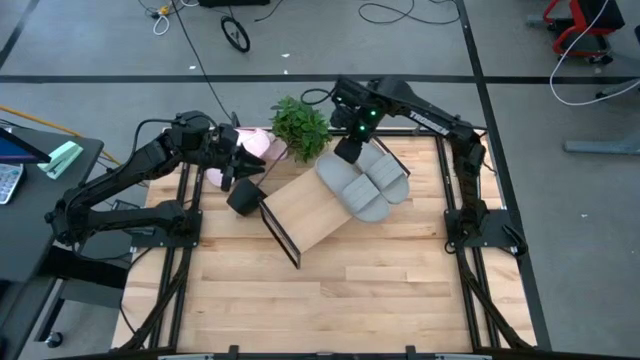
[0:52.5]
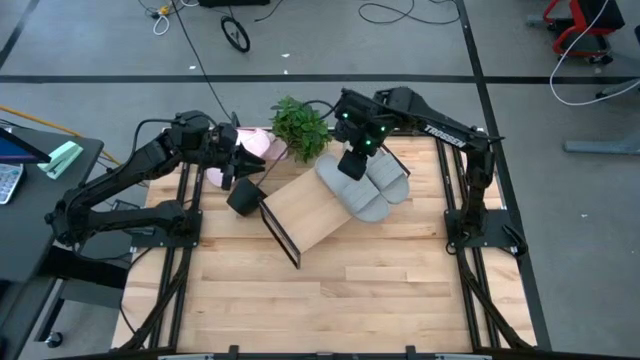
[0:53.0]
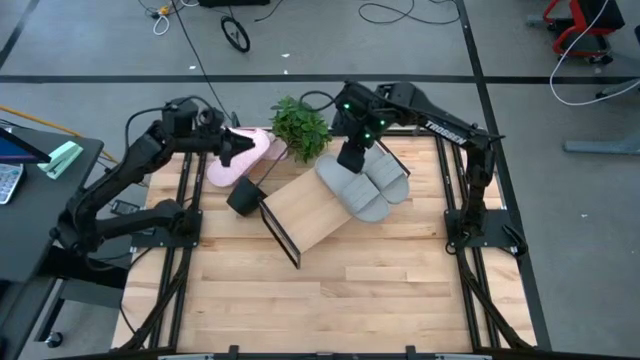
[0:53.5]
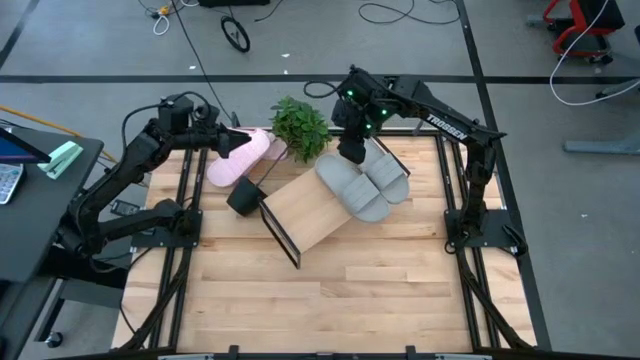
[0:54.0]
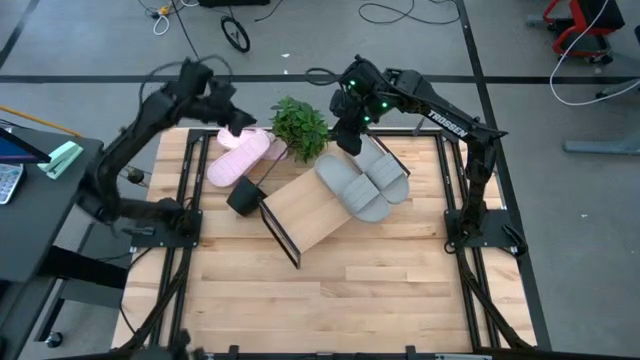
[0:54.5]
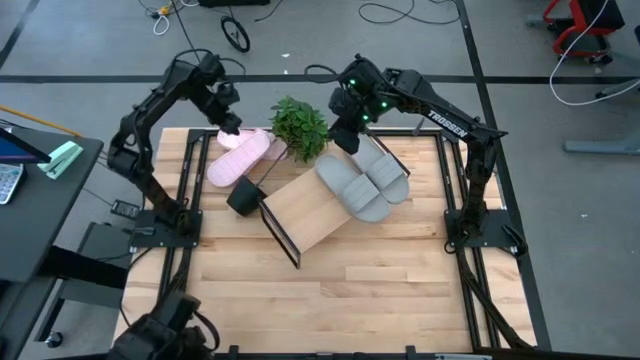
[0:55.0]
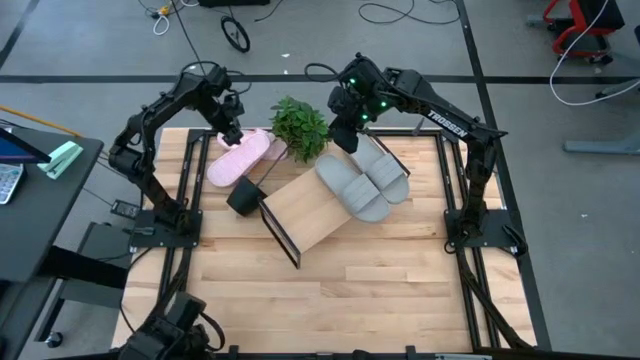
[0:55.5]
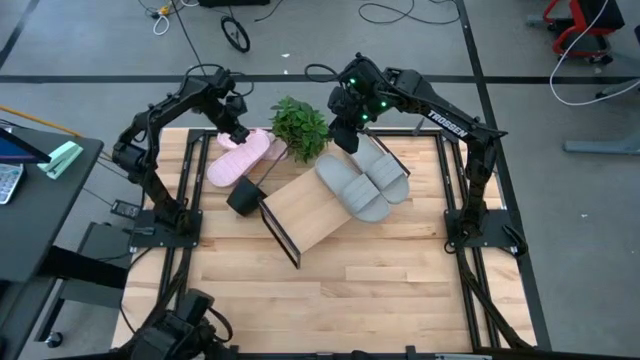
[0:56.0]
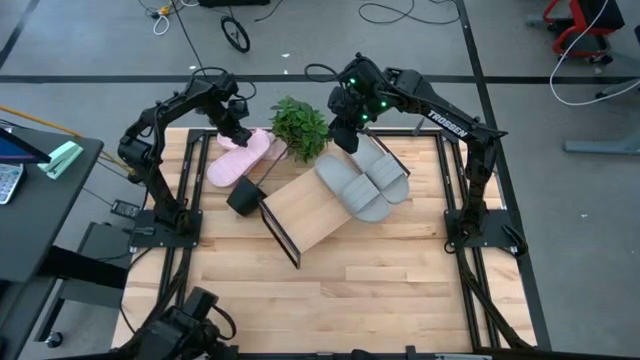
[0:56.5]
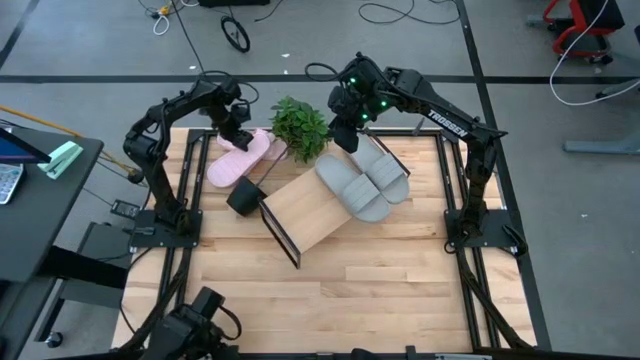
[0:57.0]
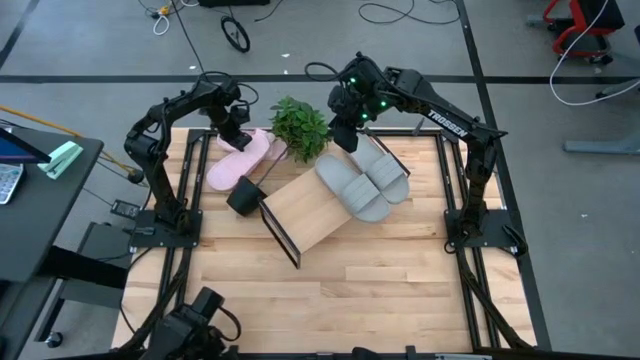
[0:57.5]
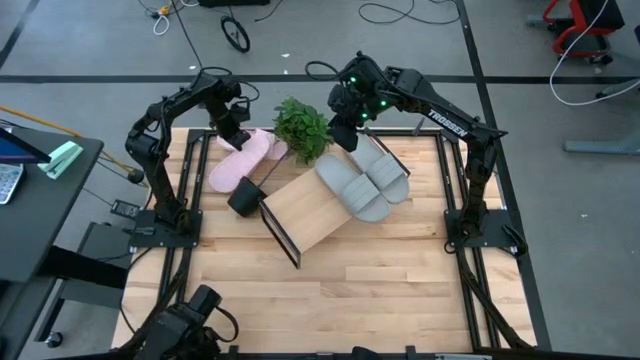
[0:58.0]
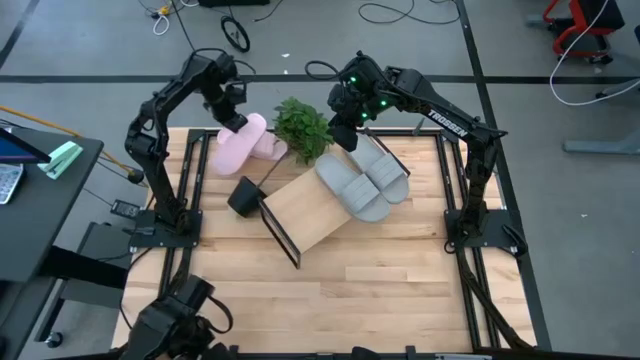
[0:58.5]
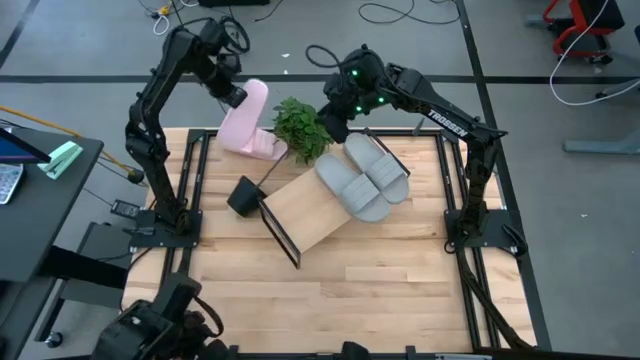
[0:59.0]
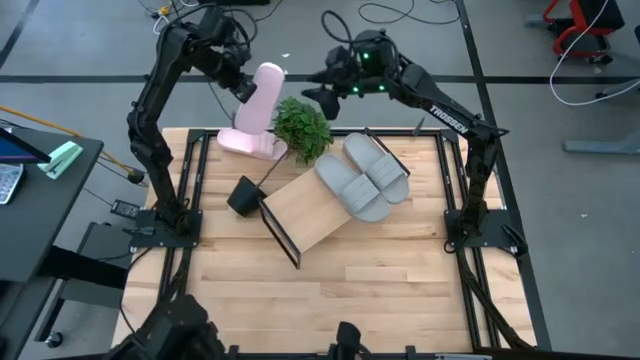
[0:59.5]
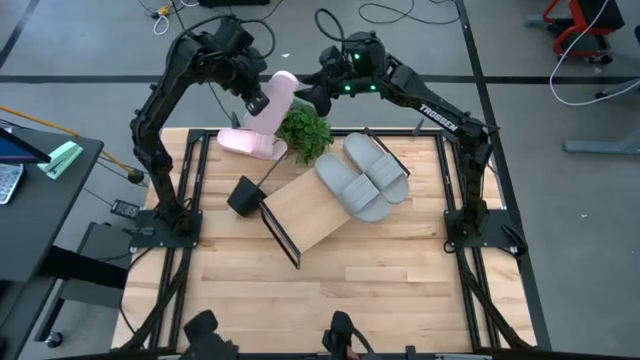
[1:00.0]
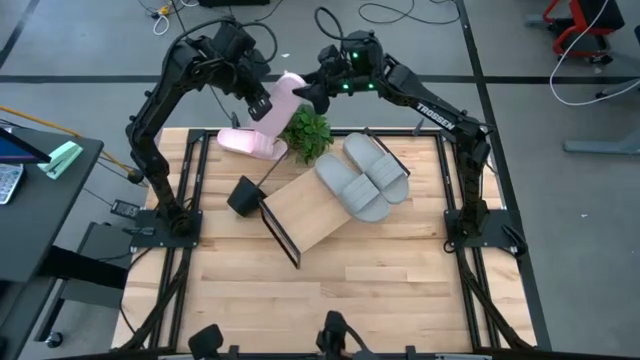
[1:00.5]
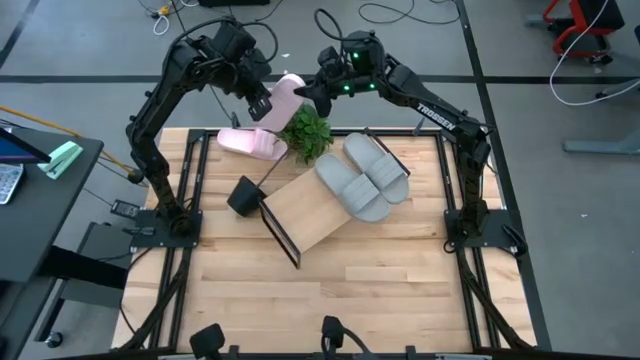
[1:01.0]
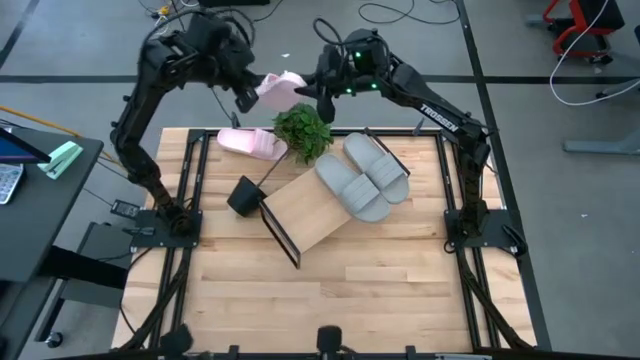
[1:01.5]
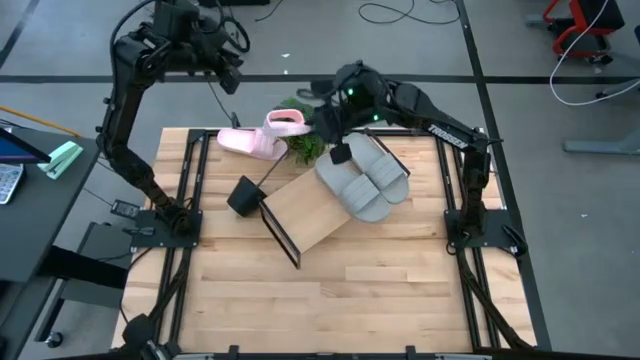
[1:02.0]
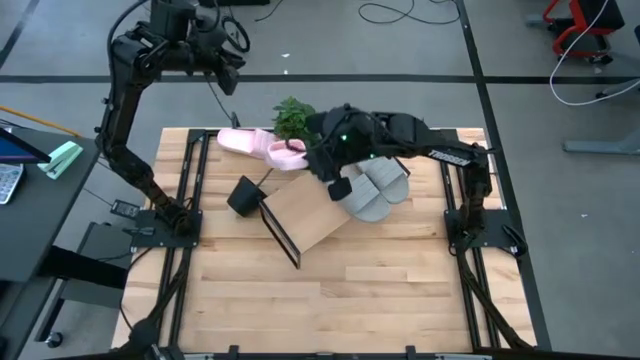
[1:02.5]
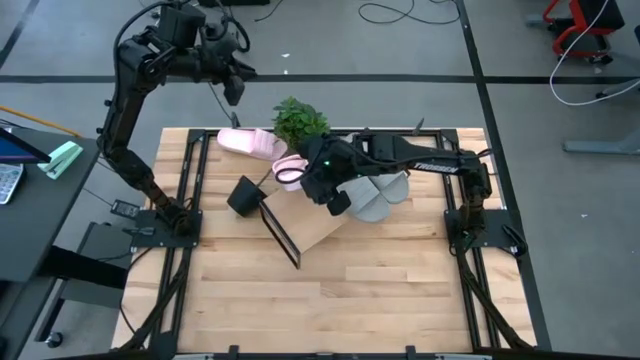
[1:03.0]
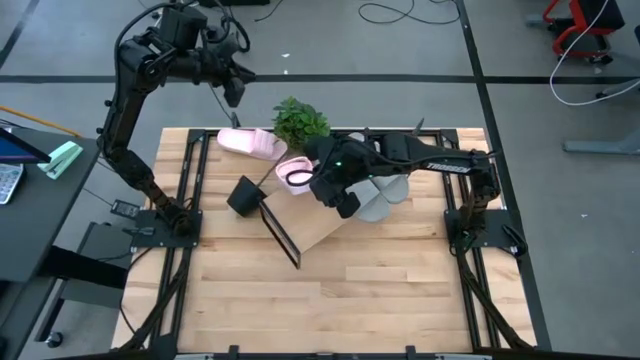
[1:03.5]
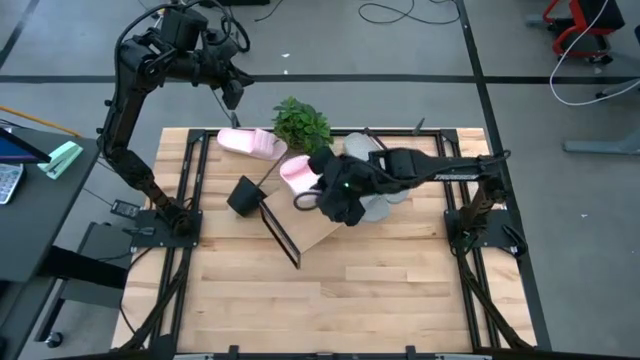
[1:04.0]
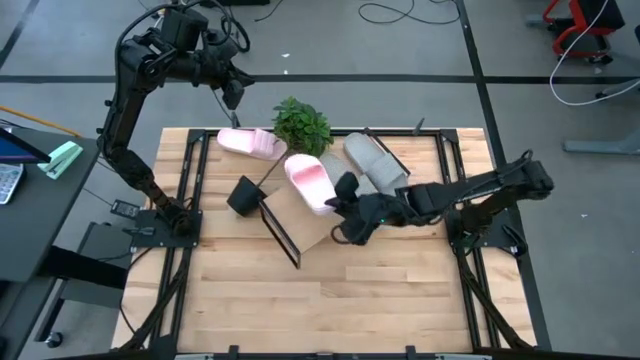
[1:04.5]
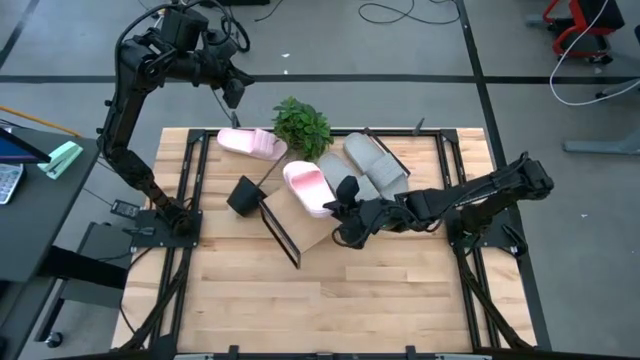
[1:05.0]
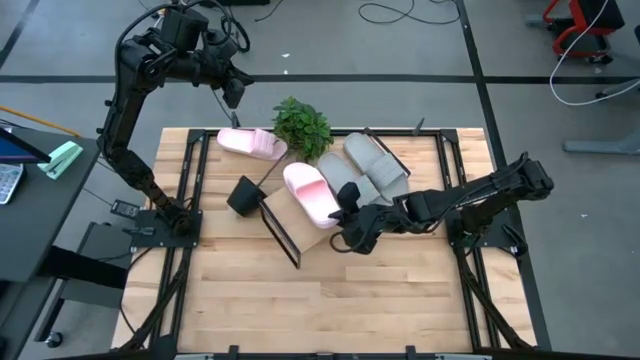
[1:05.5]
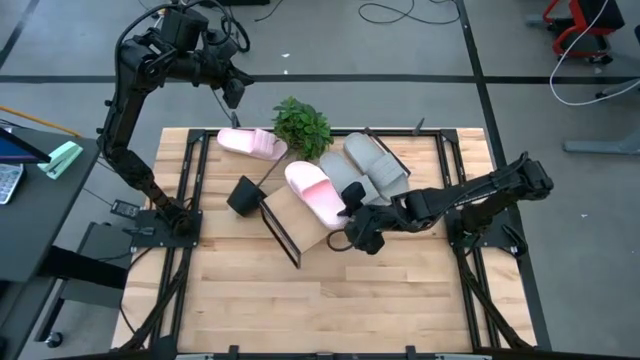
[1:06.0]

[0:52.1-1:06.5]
Task: Pick and place slides into the shelf
Put the bottom pink slides on the shelf

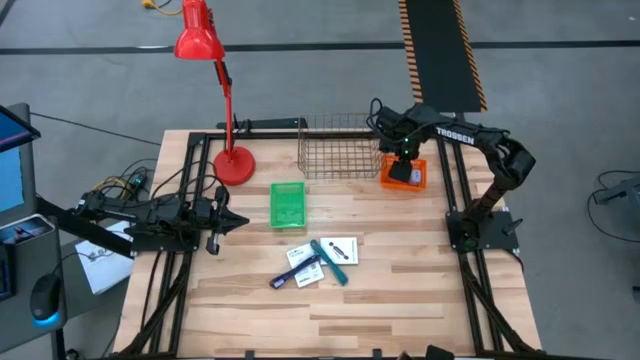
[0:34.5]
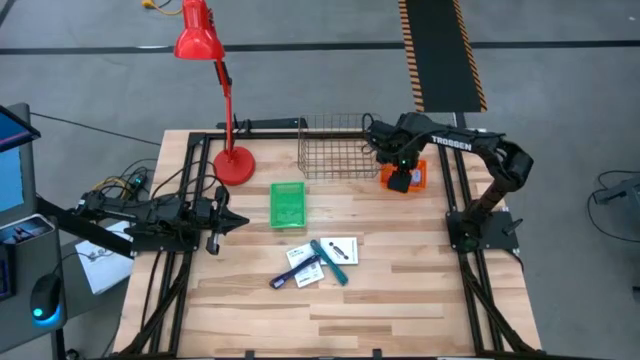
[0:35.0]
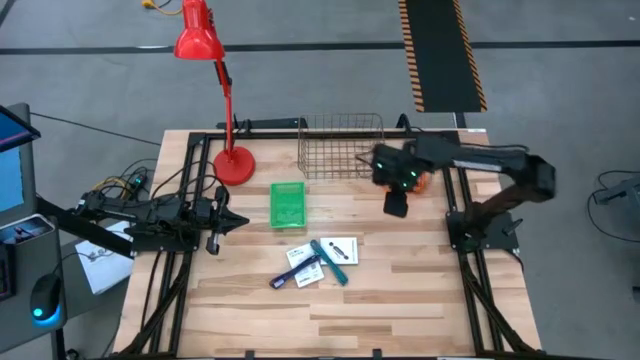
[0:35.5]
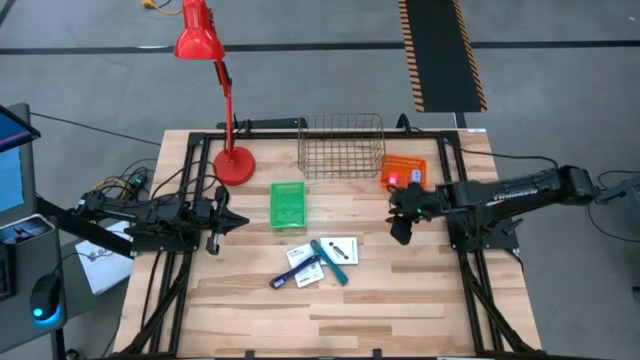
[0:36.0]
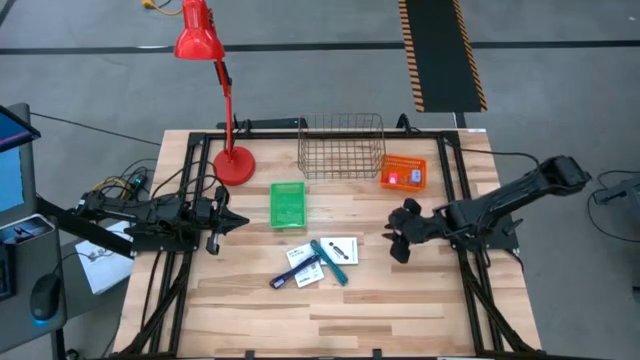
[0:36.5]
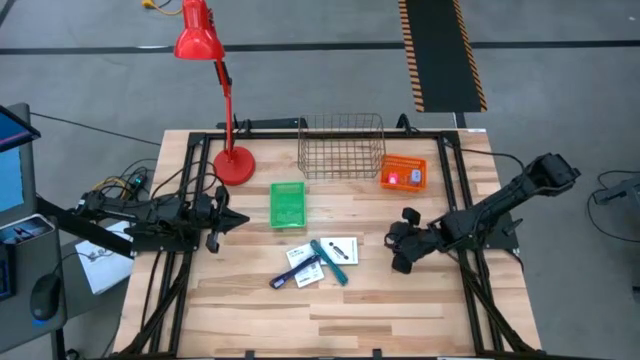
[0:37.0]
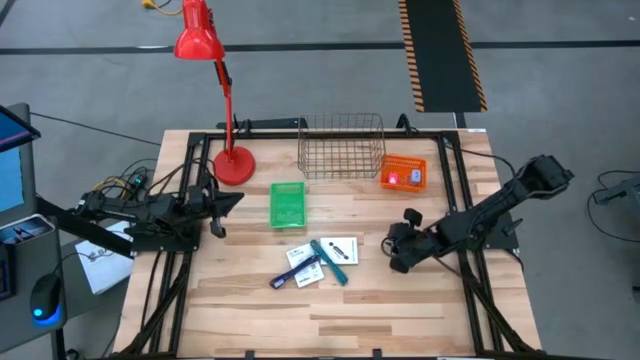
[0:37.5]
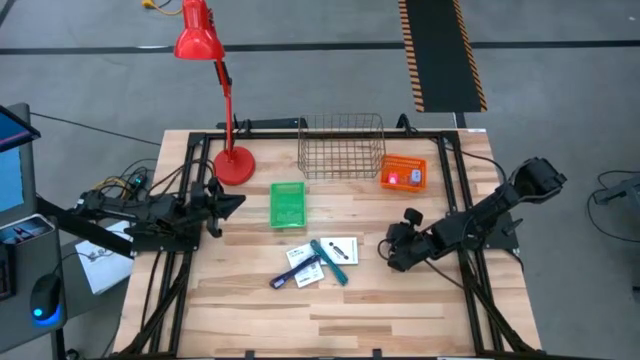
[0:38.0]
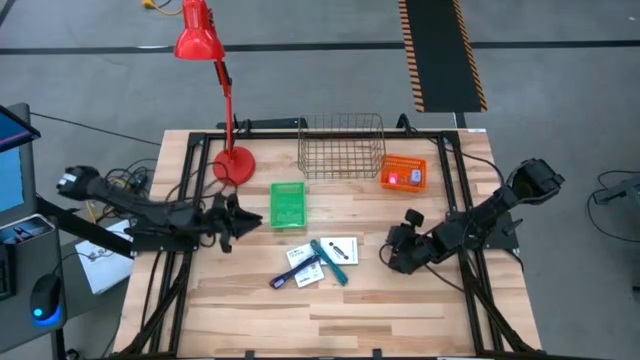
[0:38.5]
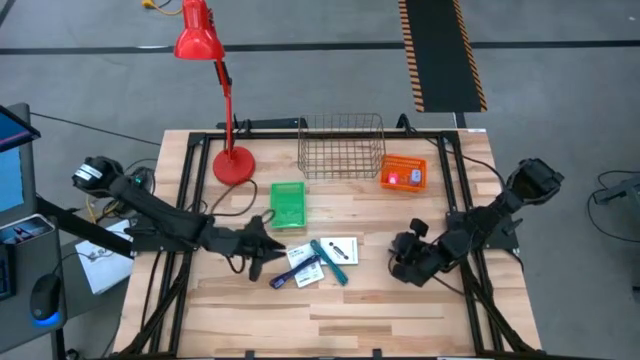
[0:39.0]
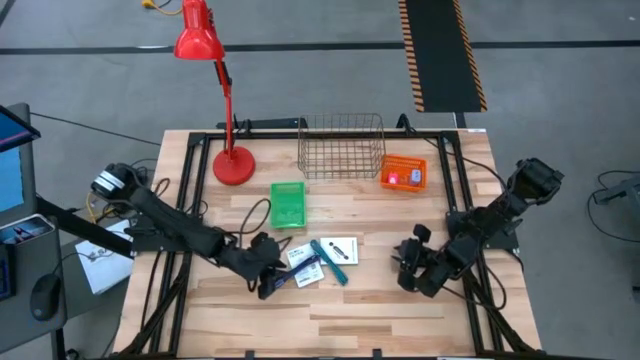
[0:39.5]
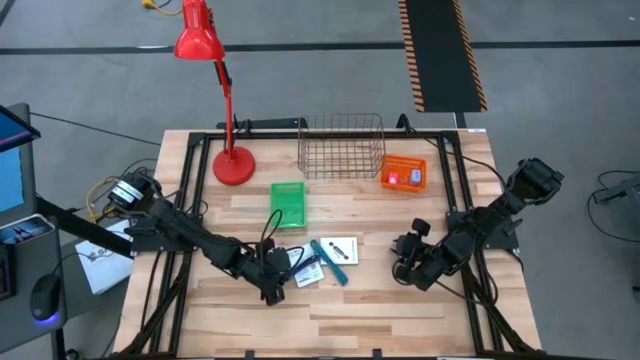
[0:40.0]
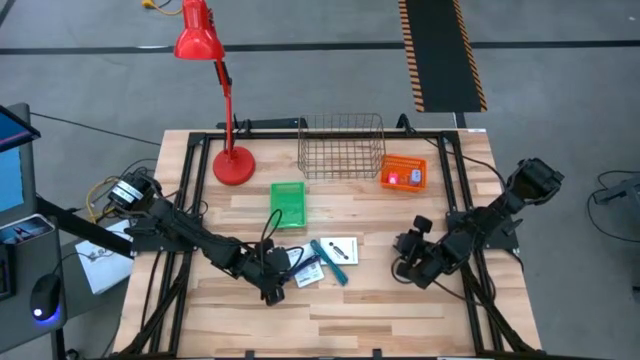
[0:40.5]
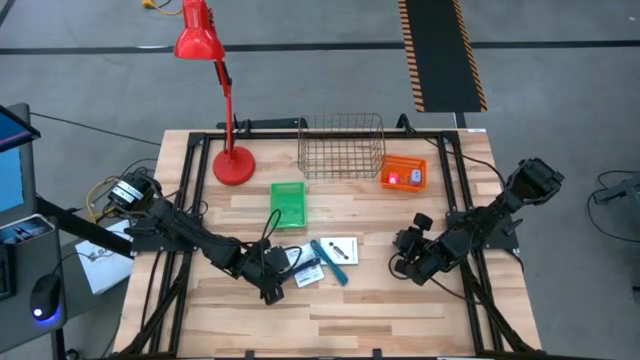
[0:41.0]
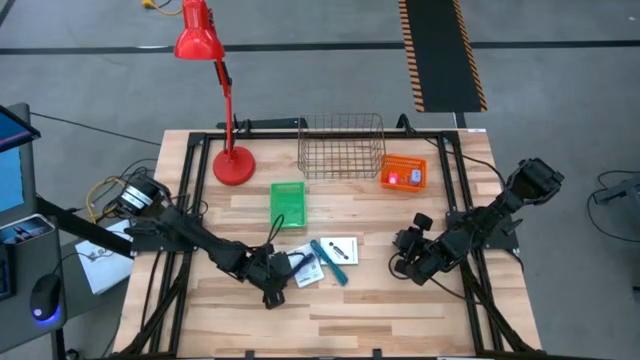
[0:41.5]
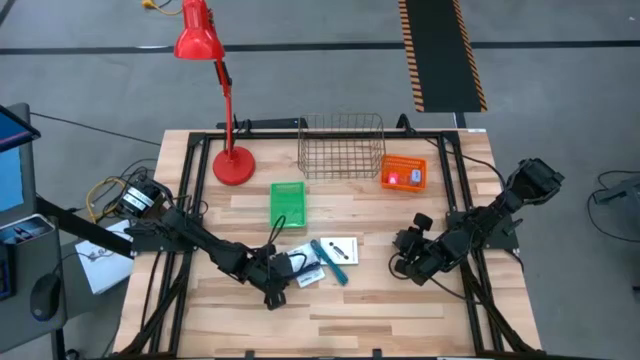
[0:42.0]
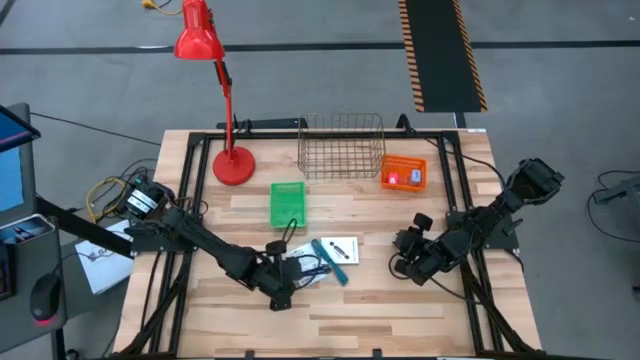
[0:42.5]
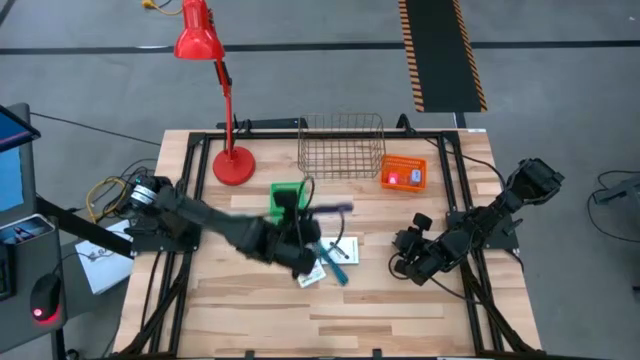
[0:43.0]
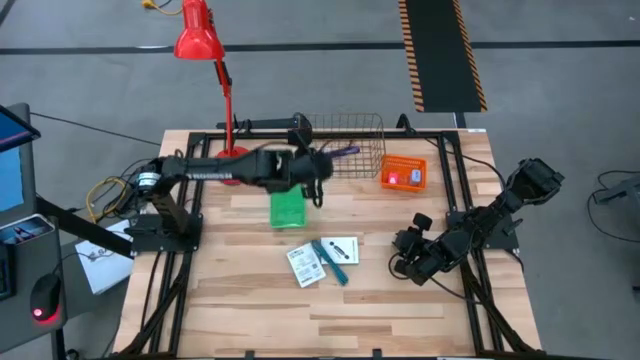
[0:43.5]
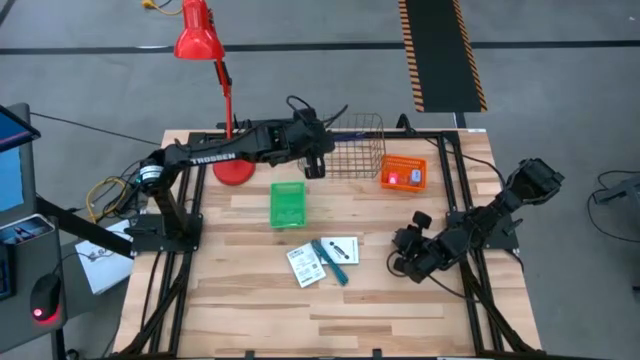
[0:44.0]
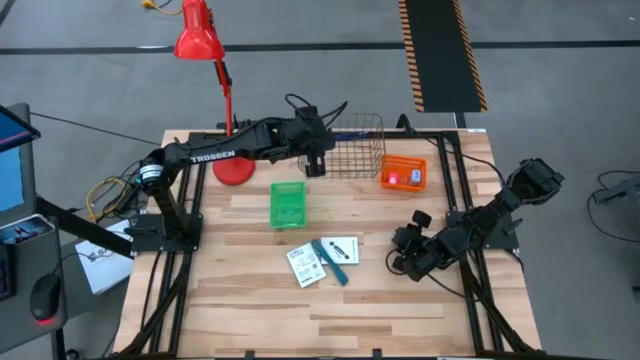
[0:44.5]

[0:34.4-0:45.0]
Task: Pick and place items into bin
Put the blue charger cable into the wire basket
